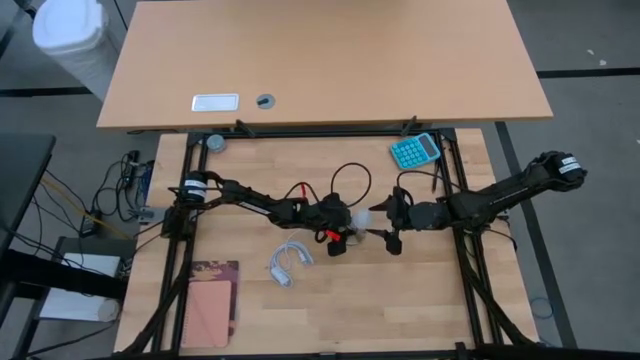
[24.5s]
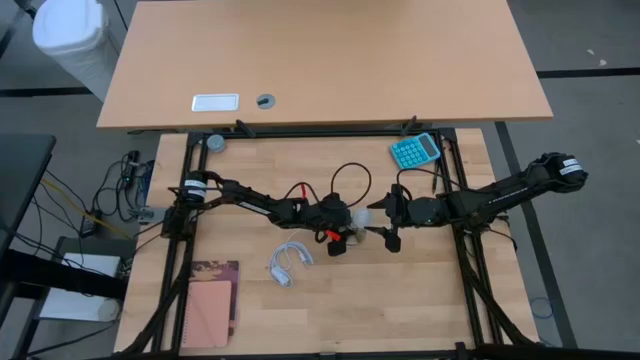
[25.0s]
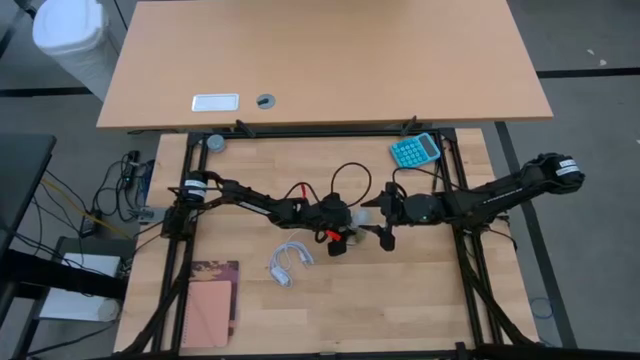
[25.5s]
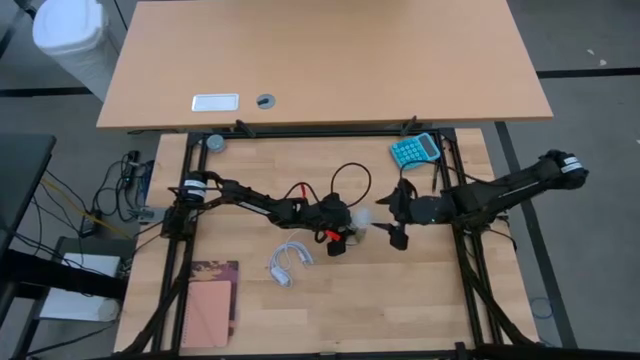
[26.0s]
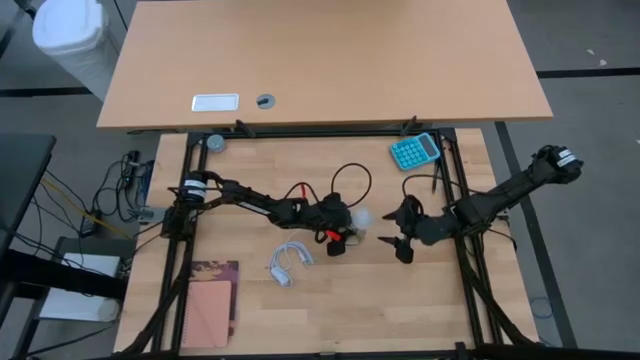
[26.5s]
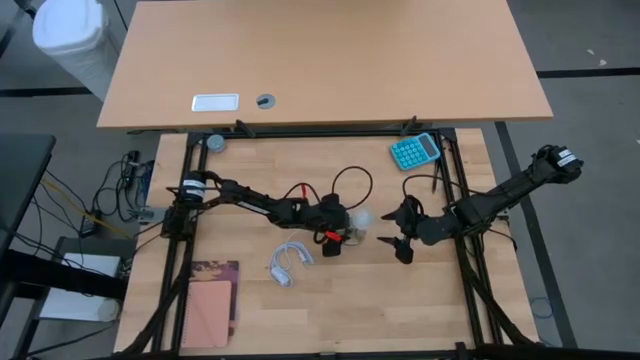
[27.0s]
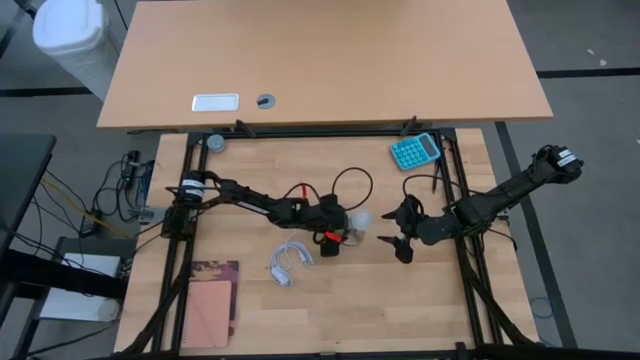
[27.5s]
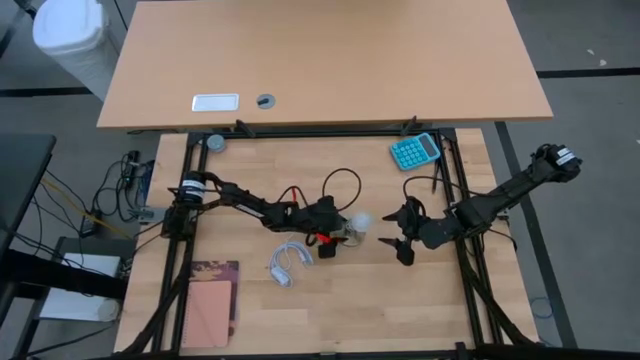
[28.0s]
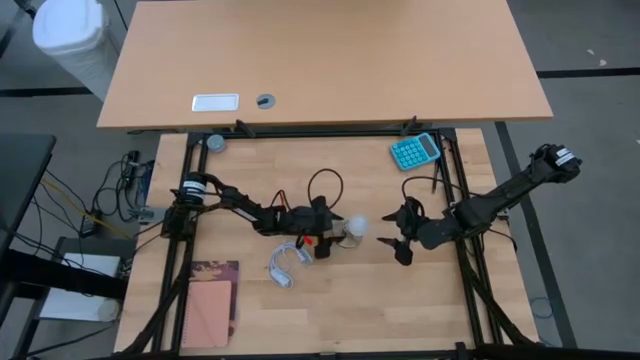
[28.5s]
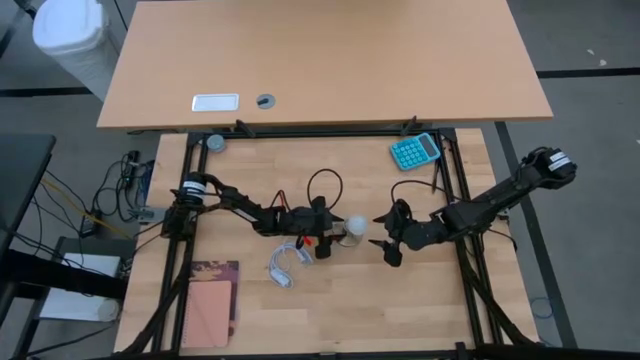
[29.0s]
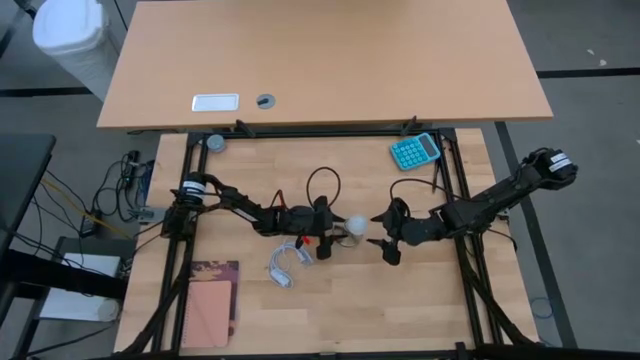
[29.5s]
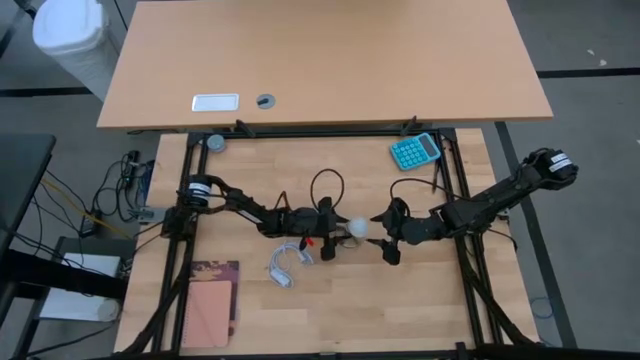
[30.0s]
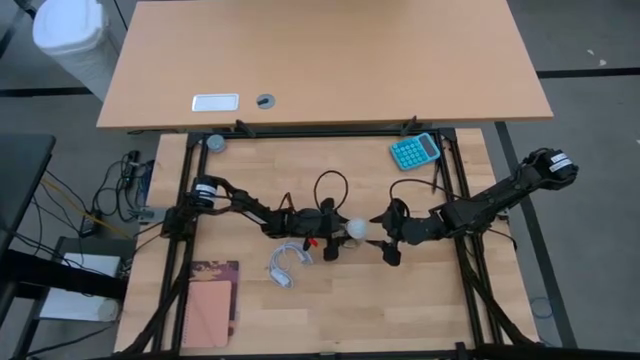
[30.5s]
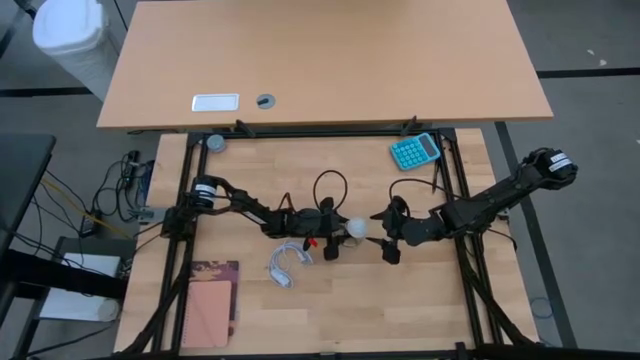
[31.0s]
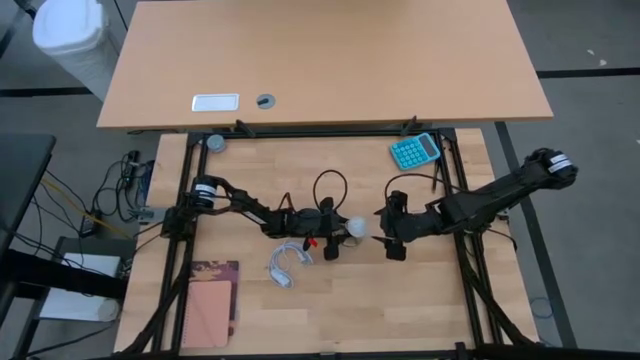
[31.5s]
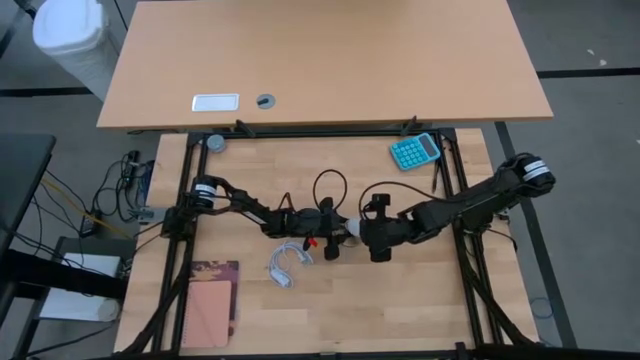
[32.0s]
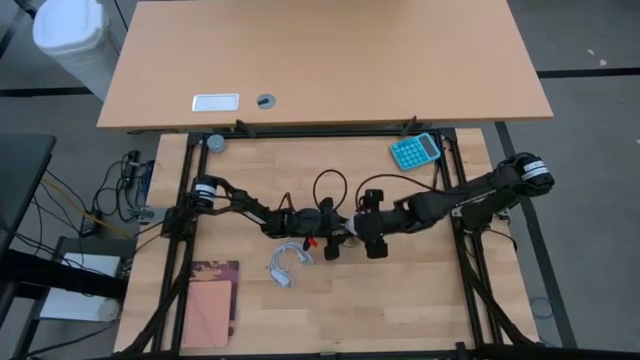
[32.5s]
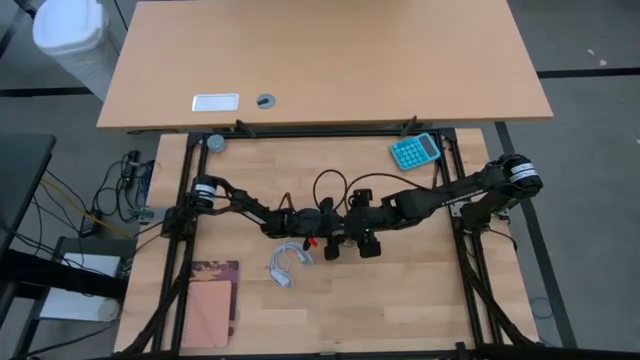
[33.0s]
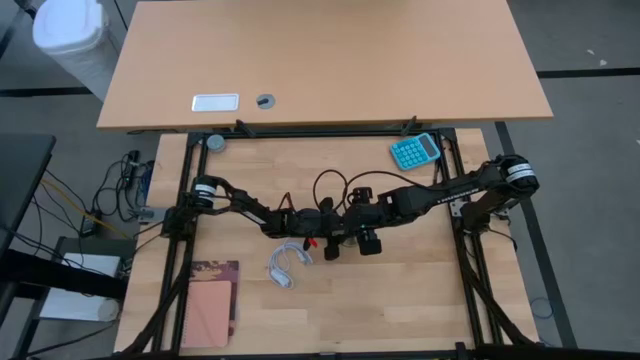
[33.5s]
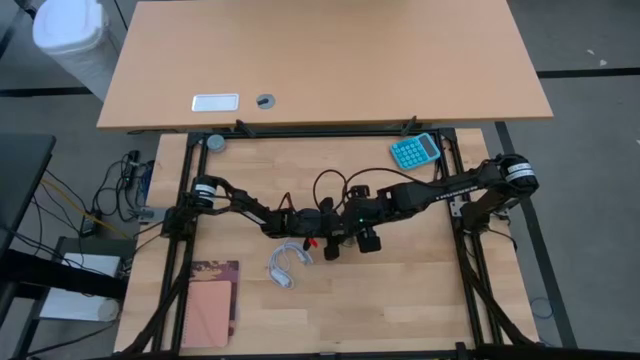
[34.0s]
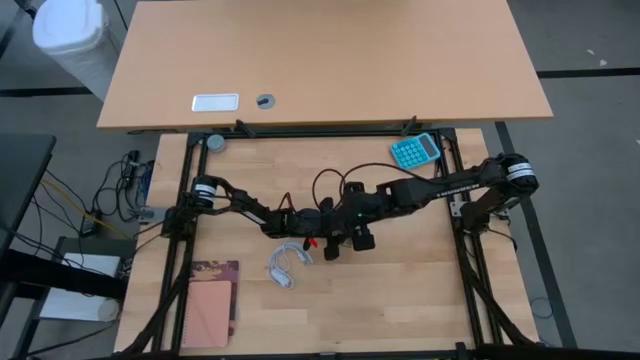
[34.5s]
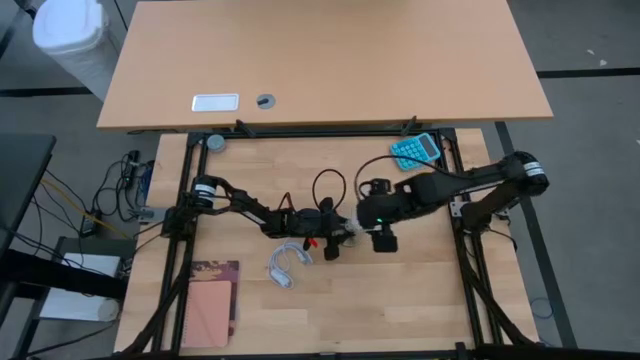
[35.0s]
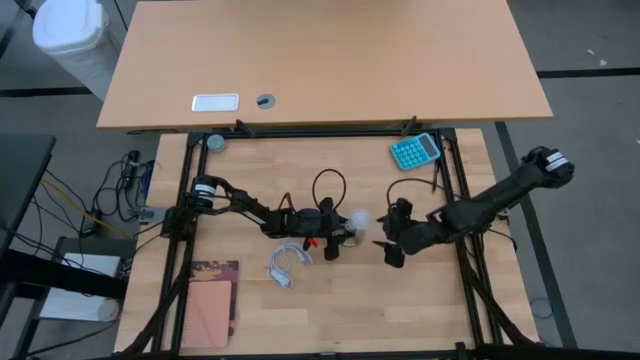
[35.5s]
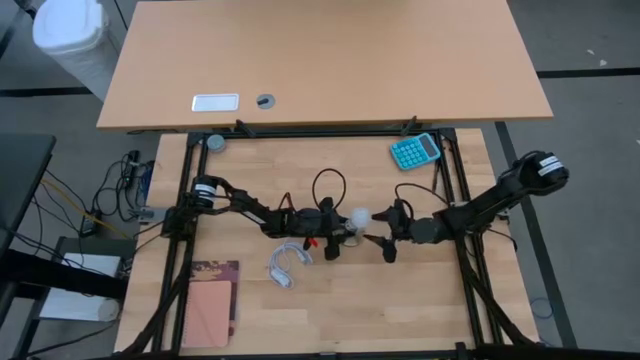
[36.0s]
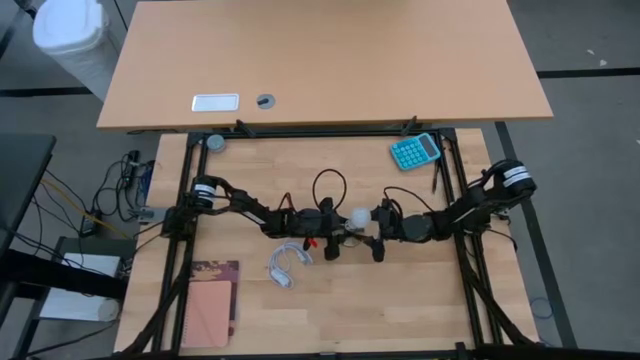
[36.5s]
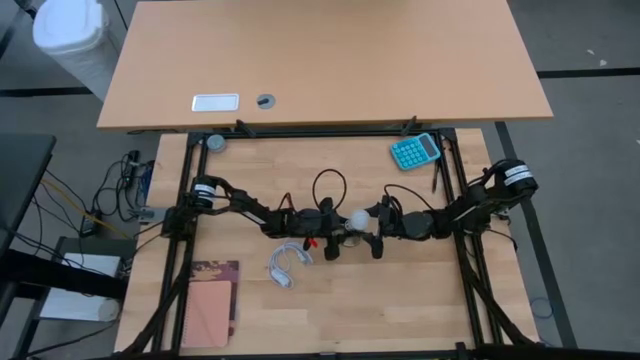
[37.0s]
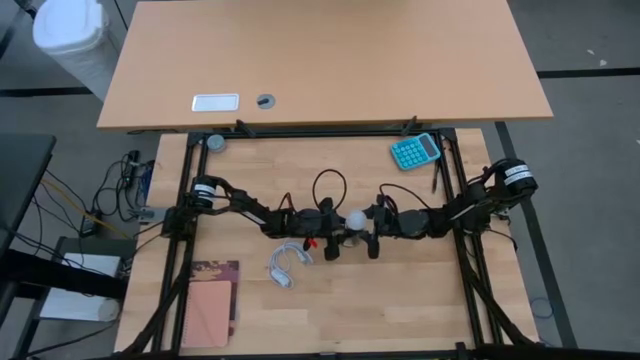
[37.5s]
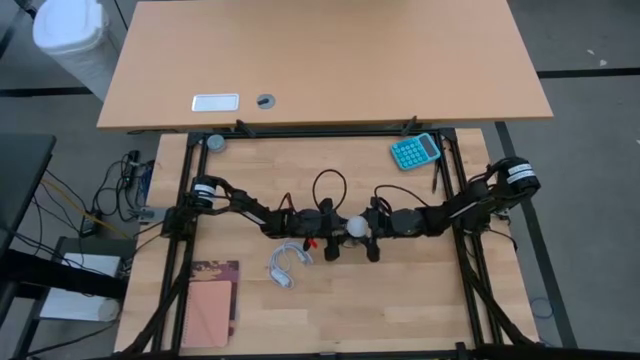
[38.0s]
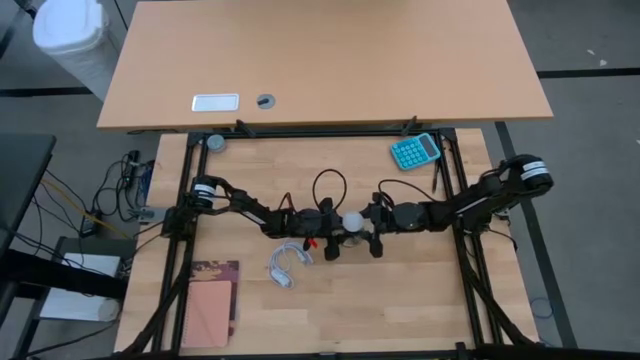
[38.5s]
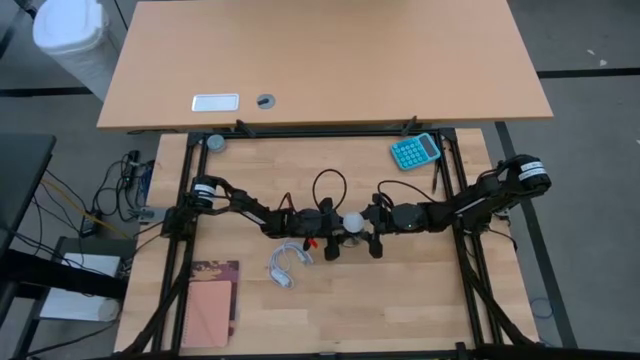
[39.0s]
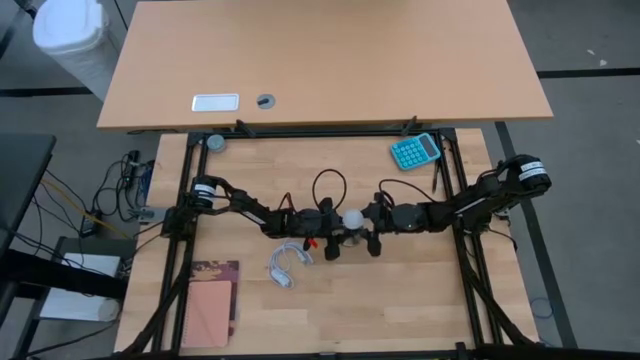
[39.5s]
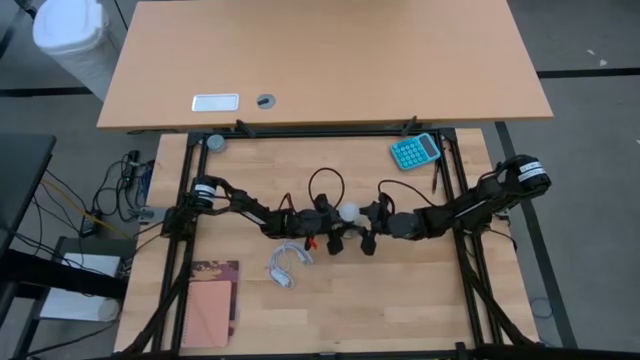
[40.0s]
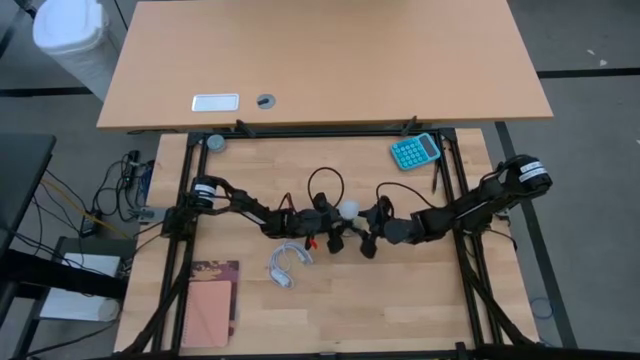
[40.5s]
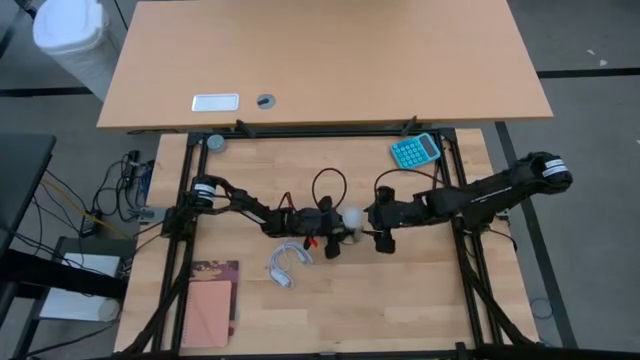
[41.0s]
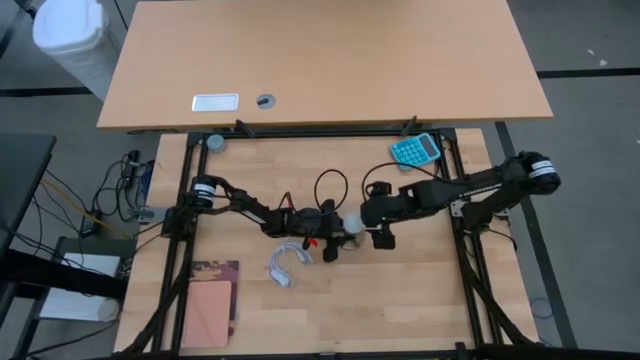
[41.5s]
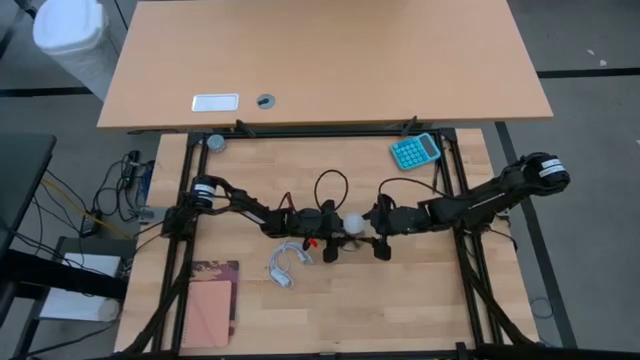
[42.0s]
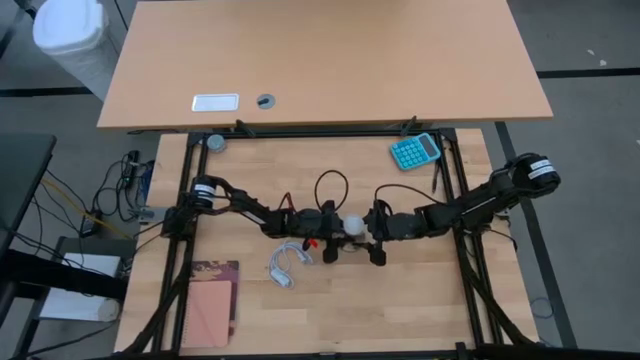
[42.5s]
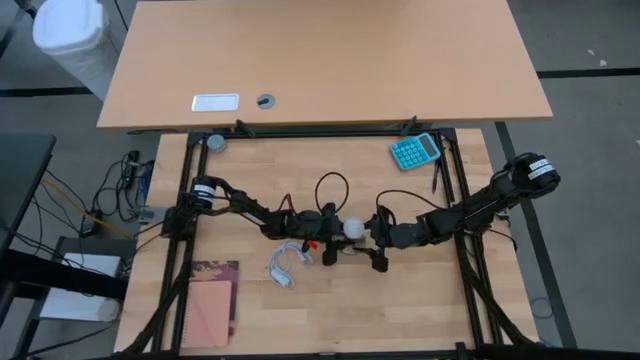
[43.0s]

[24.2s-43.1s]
Task: Screw lightbulb
Insert the lightbulb into the lamp socket
